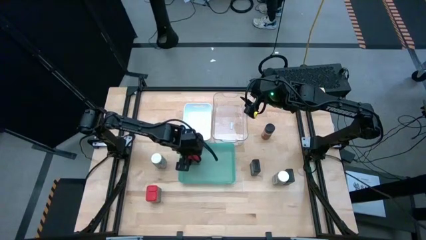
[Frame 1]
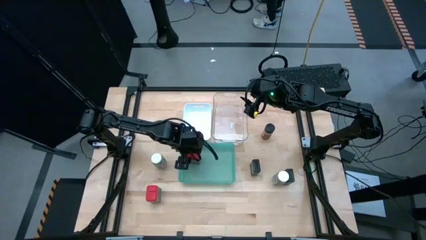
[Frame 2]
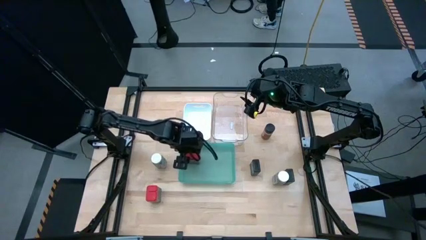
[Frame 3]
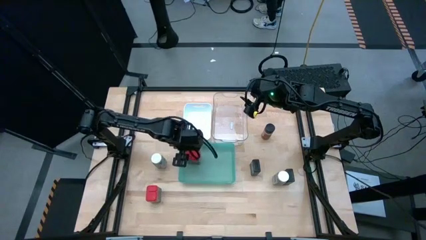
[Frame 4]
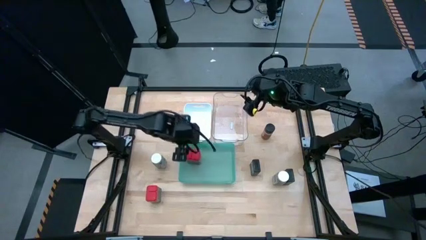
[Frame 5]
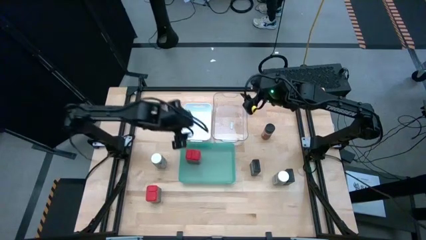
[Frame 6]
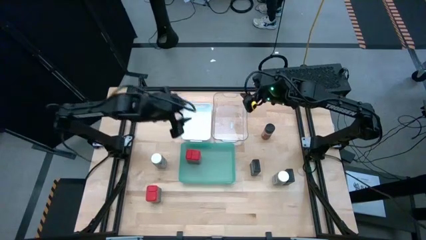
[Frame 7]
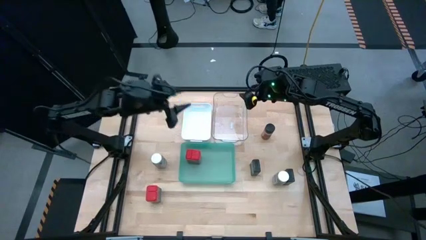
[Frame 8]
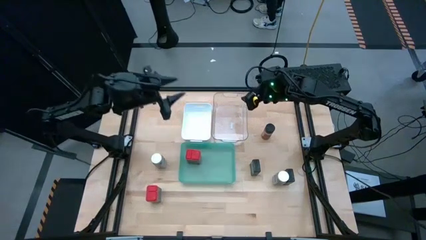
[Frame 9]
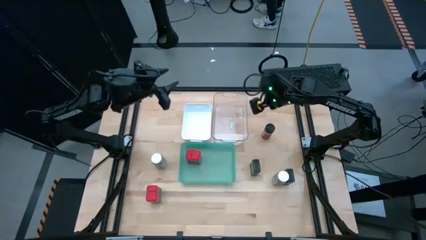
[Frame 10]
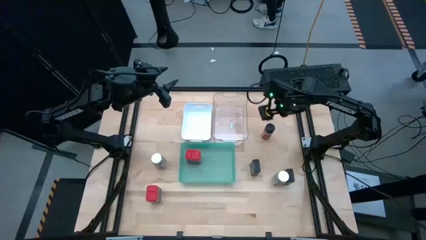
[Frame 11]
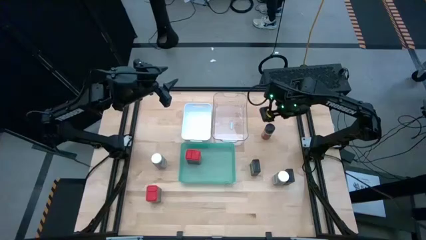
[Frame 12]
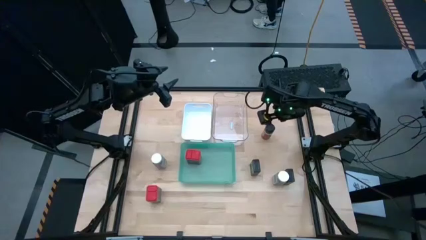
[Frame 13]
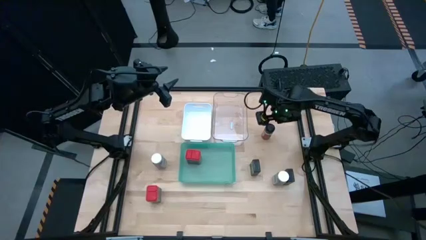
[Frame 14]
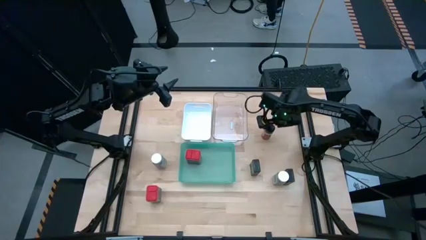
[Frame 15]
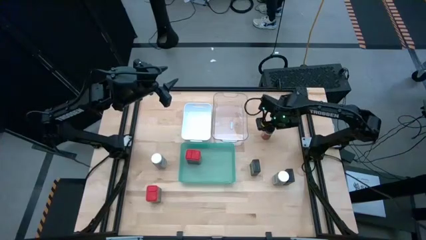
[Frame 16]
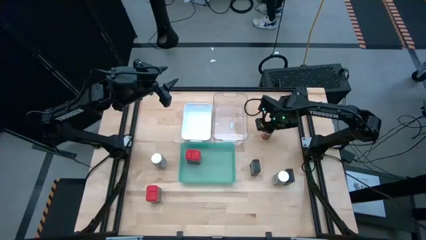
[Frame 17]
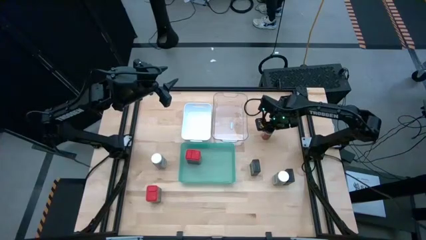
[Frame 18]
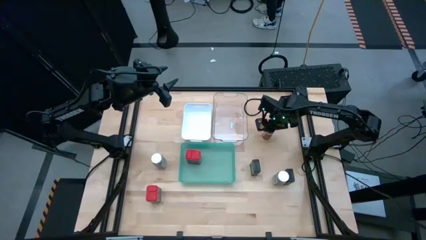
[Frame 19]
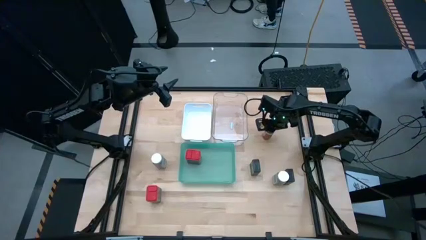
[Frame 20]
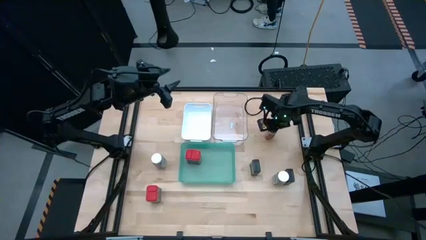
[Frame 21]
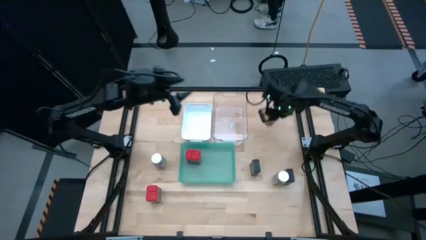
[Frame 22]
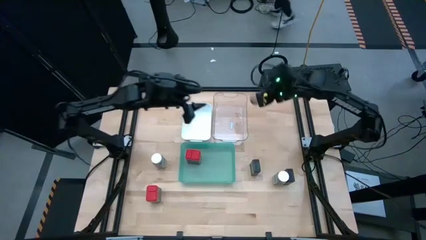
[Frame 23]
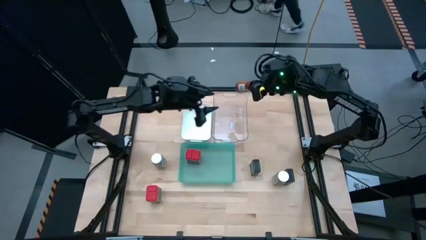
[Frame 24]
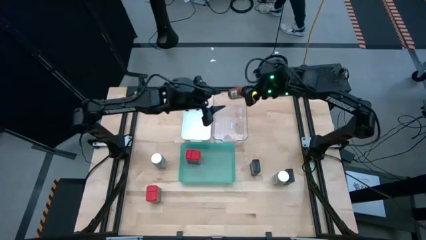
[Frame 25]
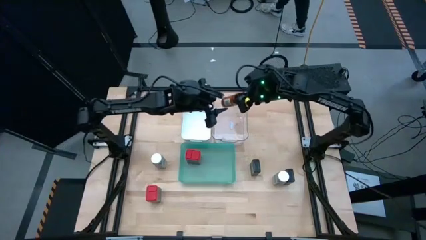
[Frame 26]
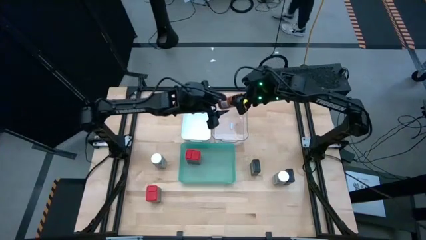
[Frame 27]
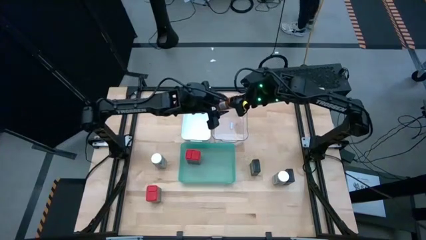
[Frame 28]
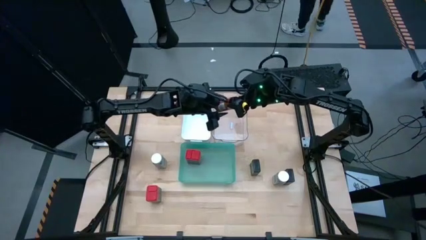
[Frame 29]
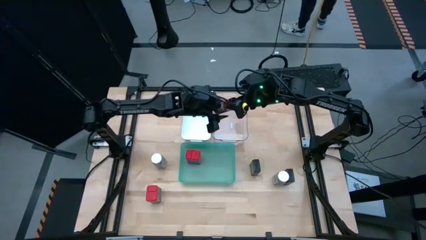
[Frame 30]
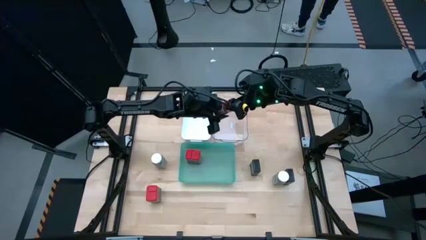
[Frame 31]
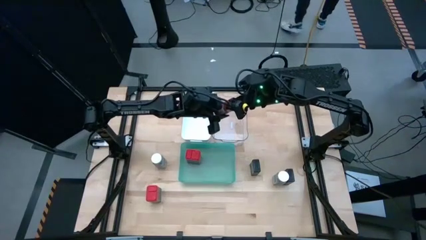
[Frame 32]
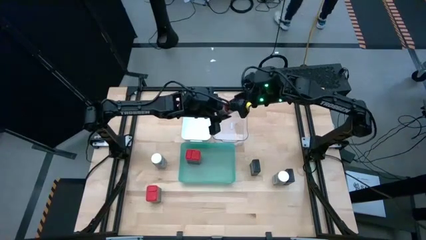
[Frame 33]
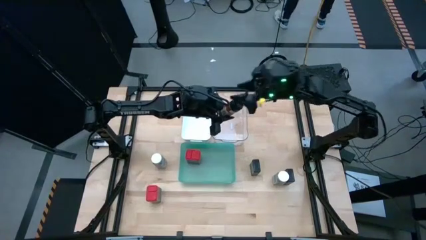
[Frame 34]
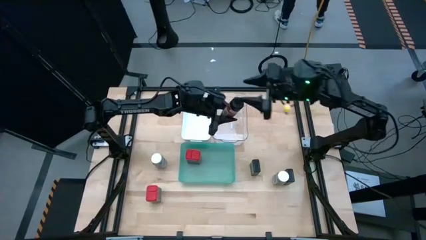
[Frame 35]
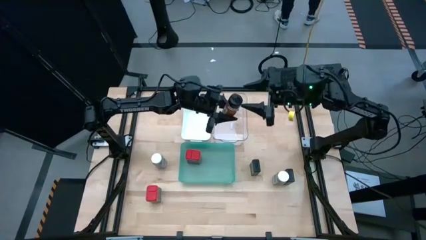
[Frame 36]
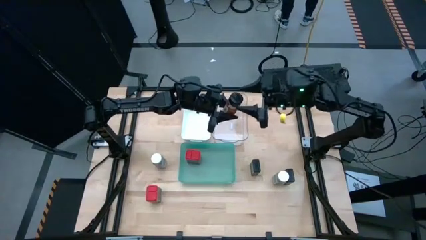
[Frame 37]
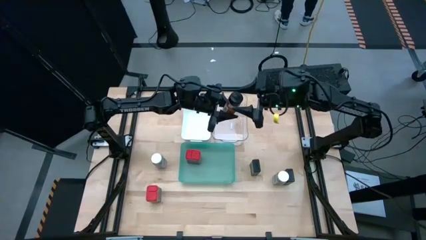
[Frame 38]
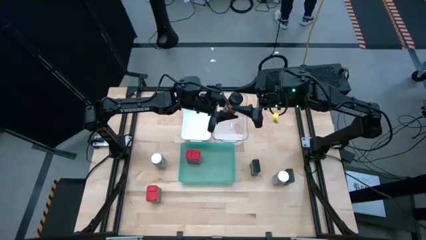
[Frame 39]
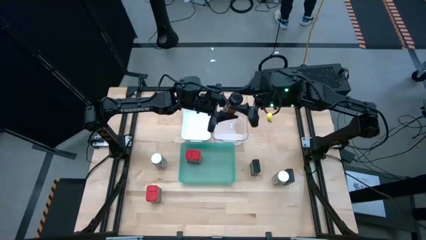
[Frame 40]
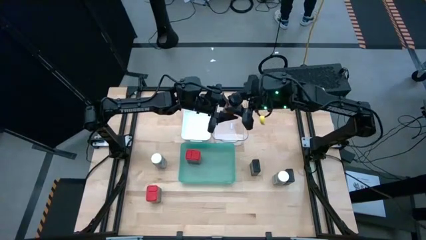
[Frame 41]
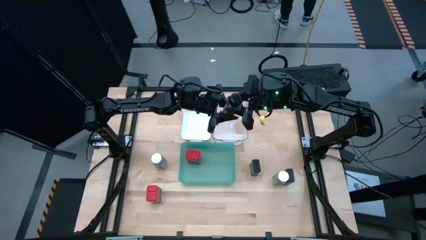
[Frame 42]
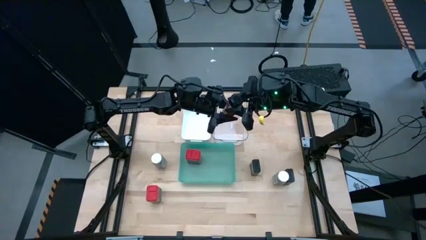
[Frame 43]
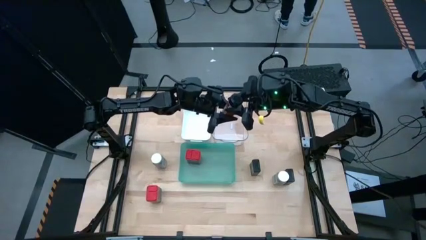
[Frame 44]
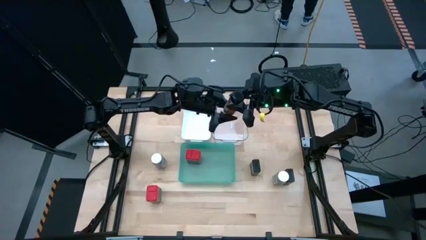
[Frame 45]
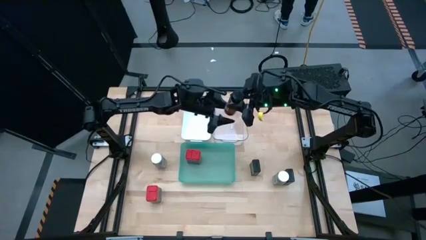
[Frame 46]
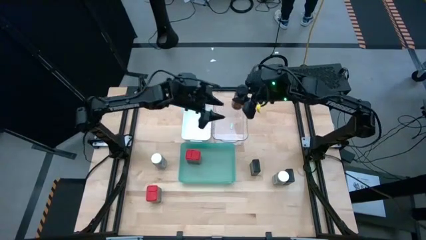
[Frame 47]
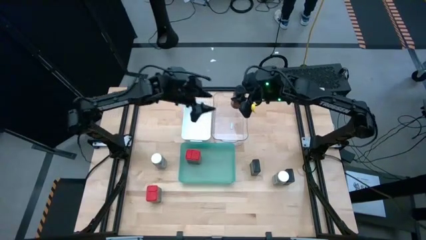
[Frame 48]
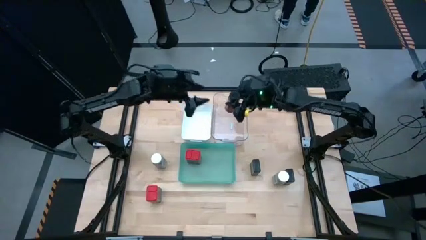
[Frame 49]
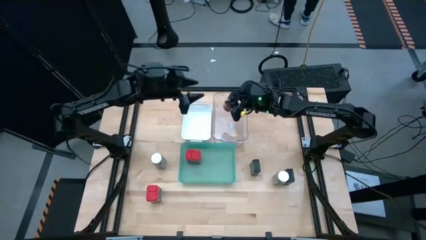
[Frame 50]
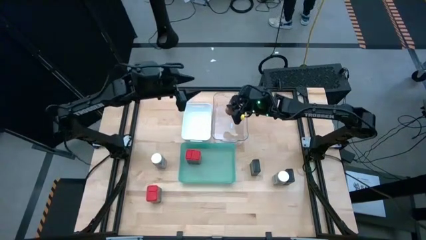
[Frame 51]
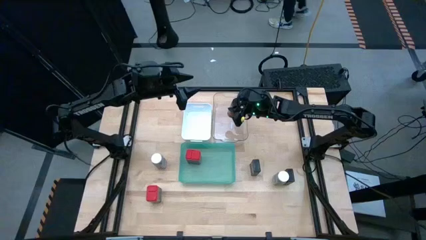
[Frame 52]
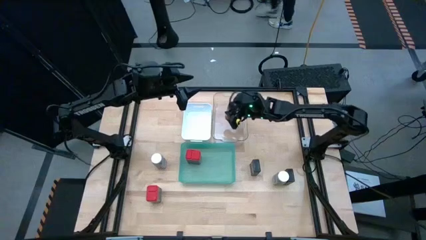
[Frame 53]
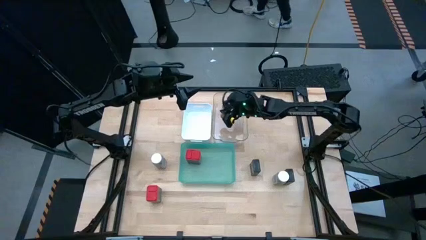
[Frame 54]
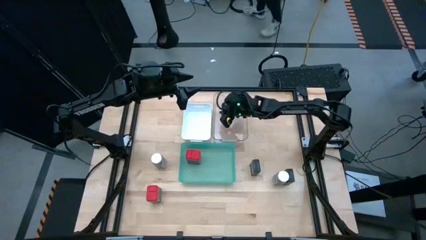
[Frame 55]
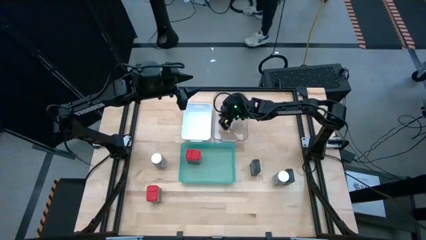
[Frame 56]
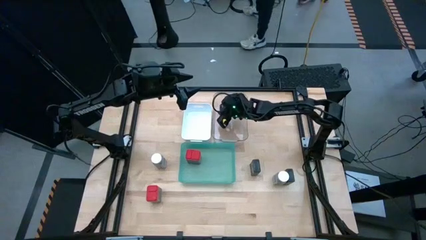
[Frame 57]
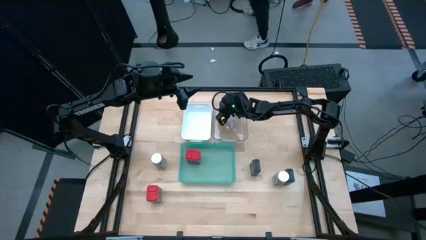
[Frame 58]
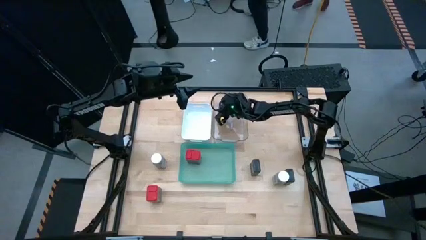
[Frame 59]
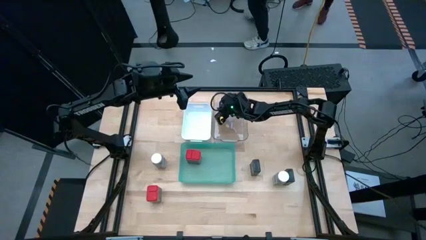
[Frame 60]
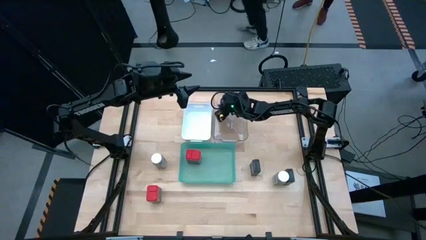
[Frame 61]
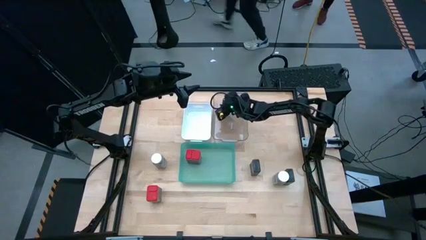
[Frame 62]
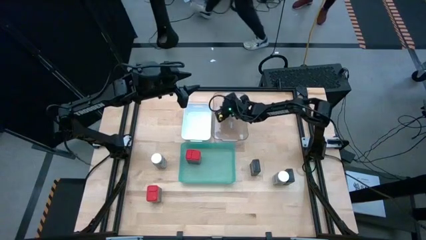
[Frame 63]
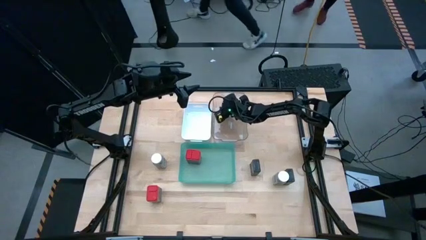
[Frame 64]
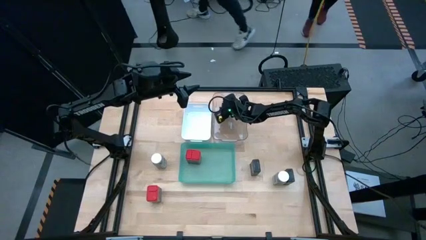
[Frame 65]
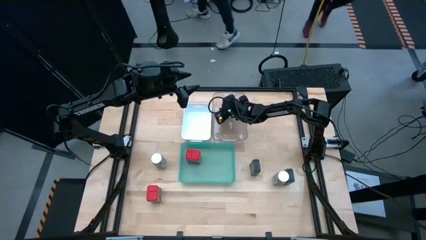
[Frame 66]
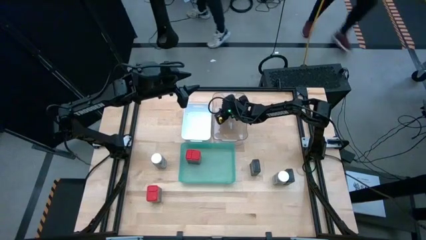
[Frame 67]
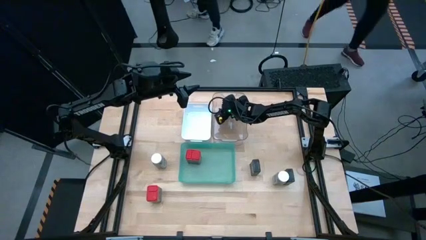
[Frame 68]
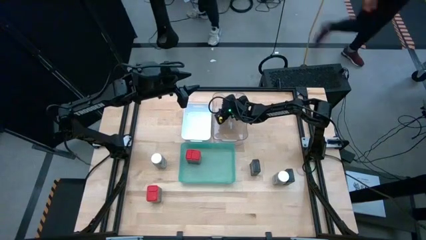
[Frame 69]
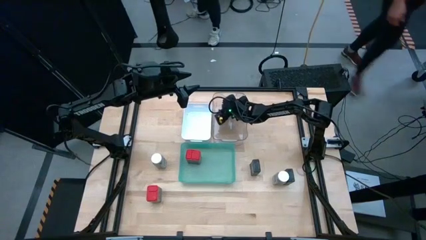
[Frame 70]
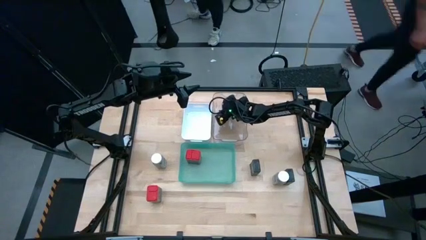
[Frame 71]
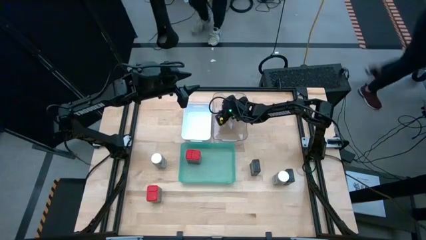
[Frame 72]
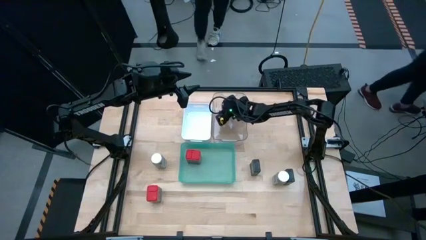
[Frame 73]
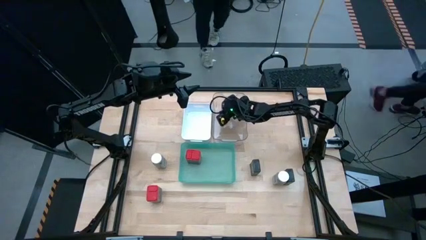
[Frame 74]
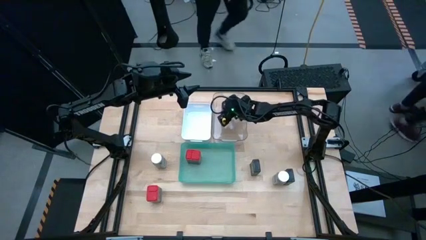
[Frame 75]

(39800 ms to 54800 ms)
Task: Sort spices by type
Put the orange spice bottle into the transparent bin

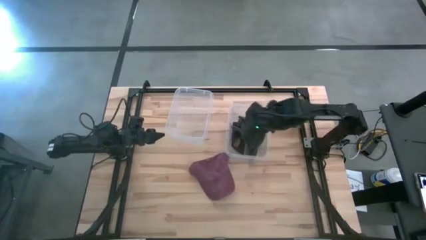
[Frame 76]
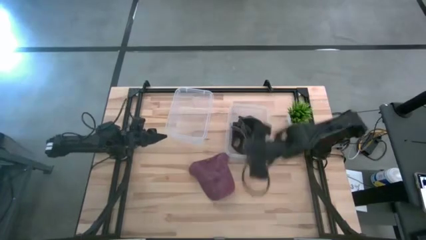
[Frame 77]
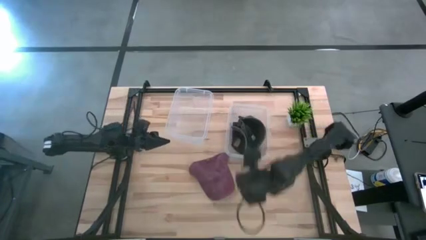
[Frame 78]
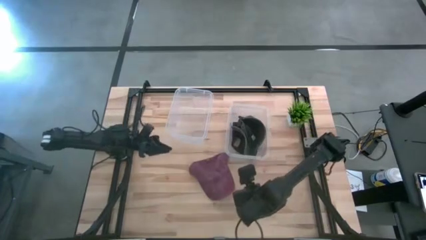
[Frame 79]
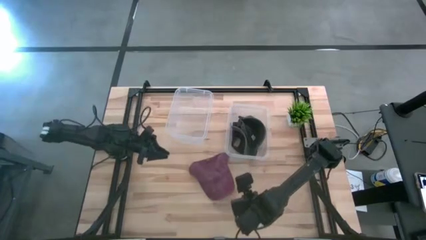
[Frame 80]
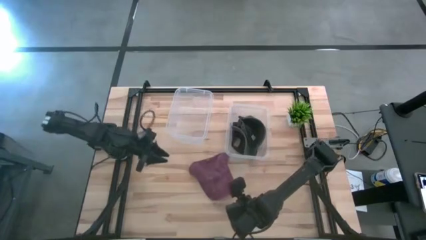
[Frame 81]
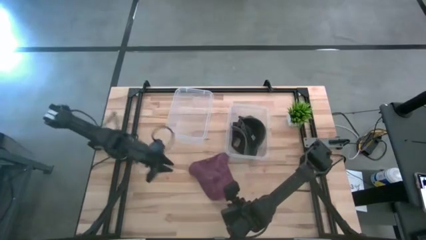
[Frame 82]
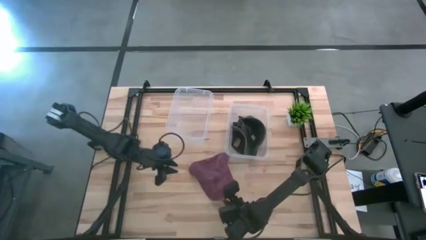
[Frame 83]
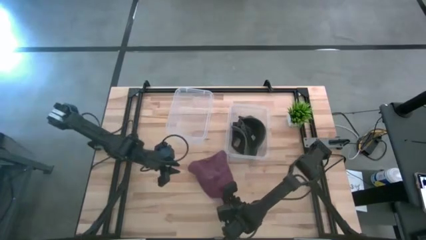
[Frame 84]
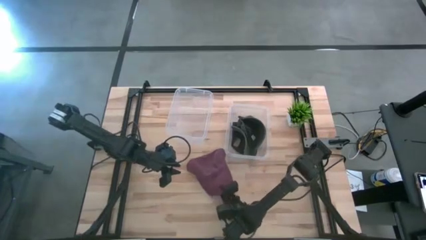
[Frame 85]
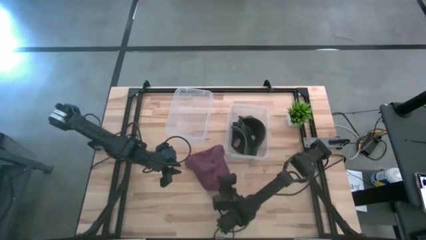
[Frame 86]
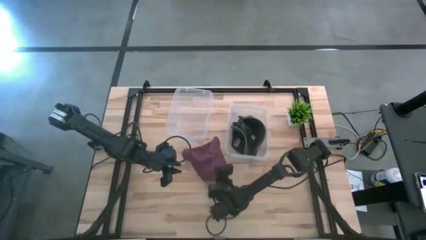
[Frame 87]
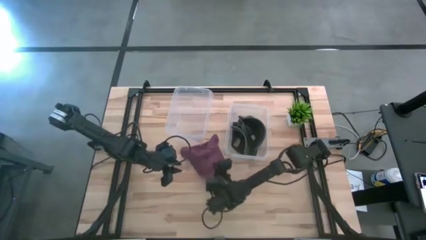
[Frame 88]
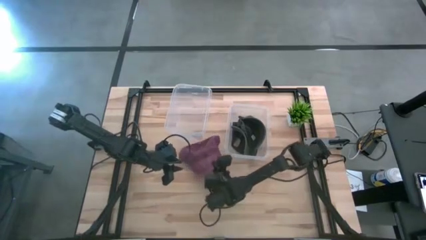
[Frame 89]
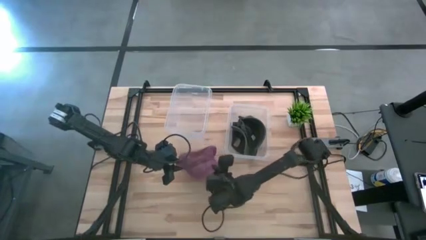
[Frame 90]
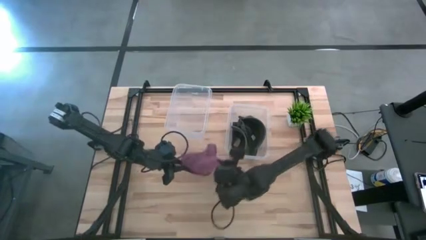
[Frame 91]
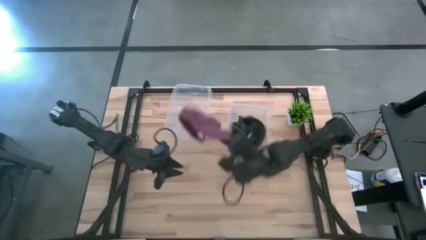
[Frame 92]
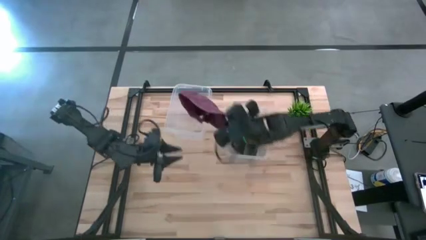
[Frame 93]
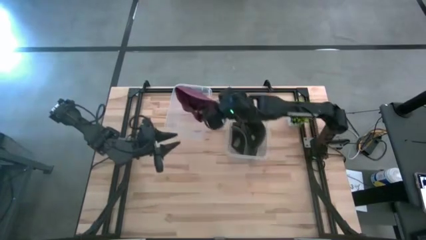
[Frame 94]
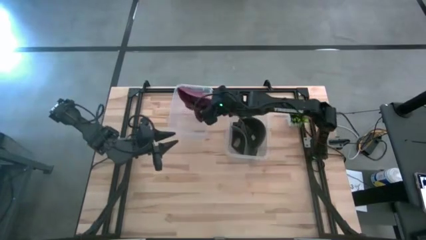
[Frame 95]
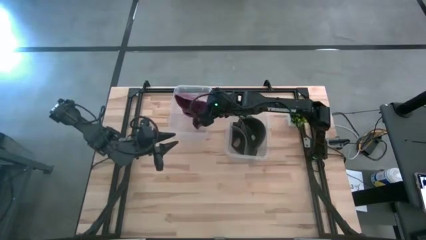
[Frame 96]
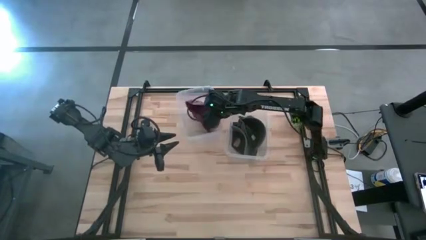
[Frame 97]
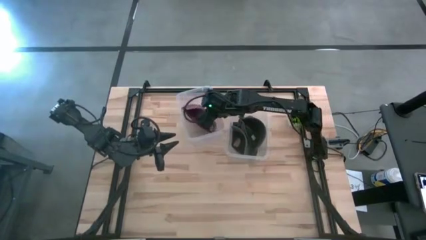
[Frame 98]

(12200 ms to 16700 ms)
Task: Pick and place caps into container
Put the red cap into the left transparent container
